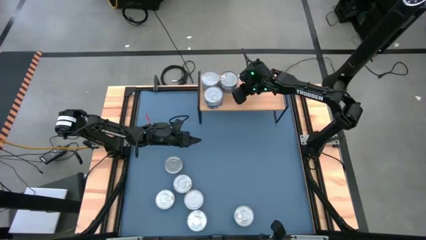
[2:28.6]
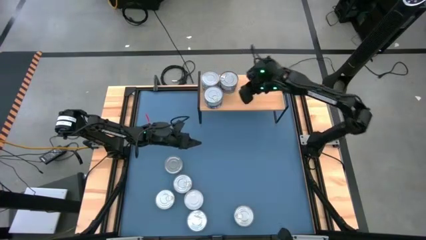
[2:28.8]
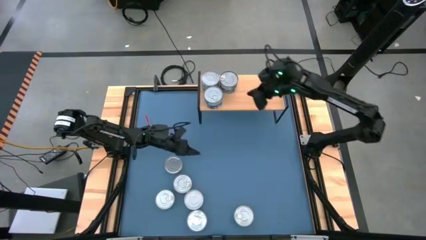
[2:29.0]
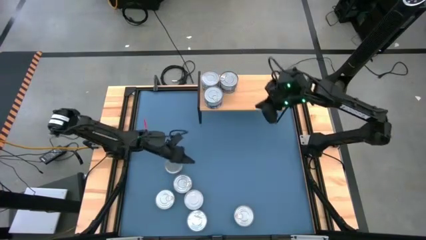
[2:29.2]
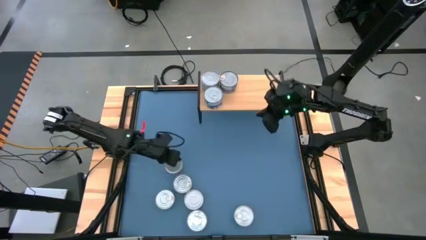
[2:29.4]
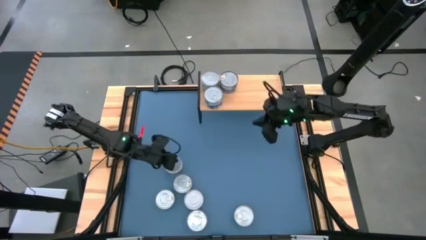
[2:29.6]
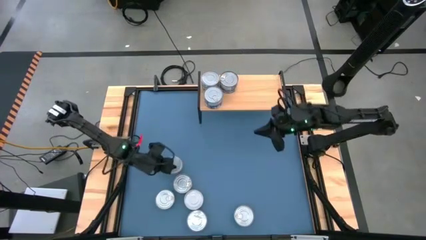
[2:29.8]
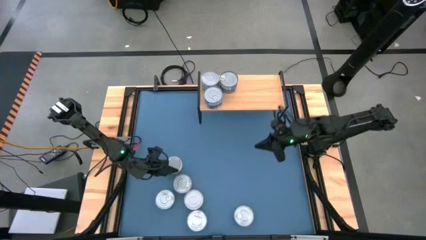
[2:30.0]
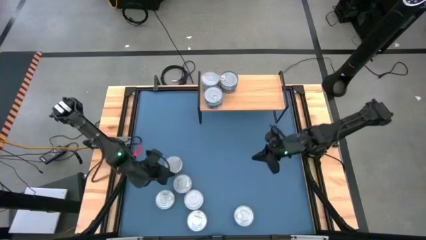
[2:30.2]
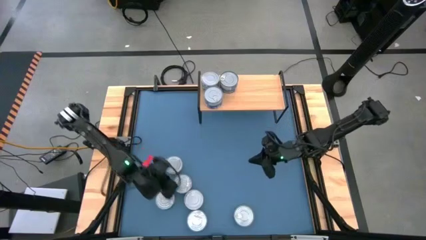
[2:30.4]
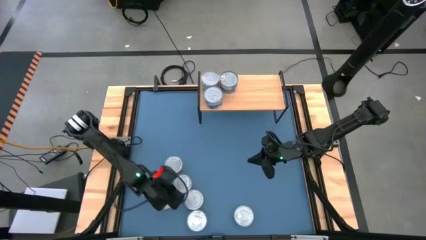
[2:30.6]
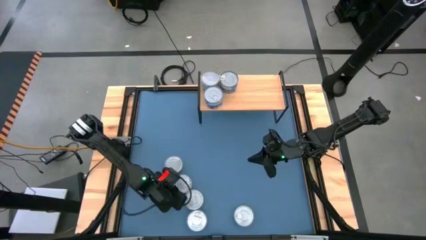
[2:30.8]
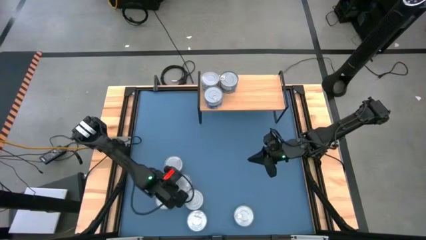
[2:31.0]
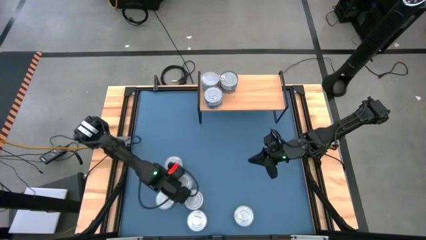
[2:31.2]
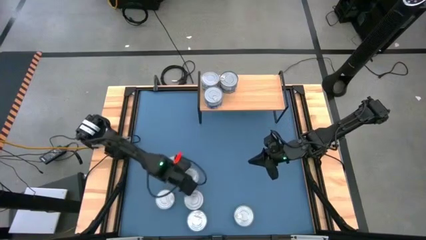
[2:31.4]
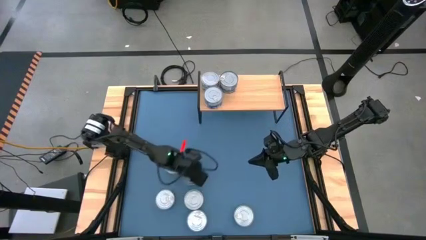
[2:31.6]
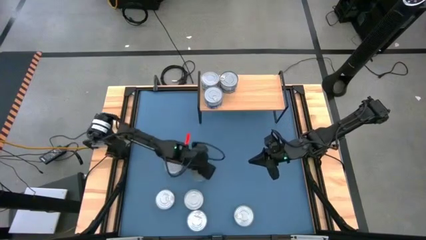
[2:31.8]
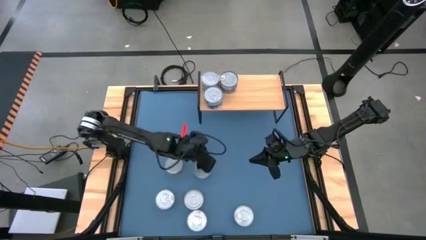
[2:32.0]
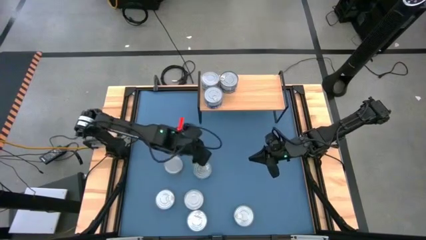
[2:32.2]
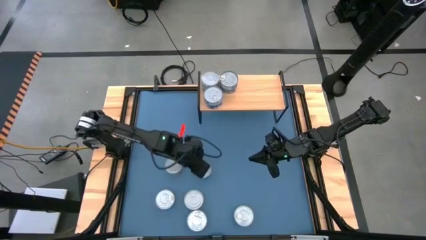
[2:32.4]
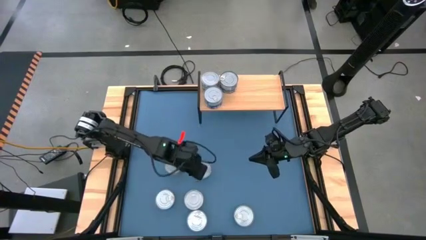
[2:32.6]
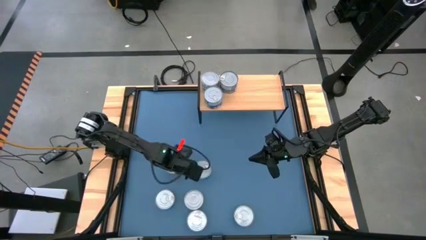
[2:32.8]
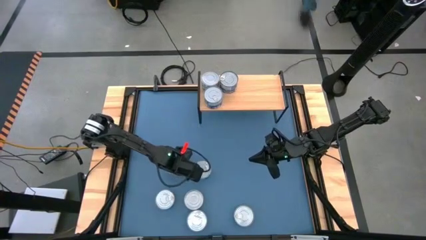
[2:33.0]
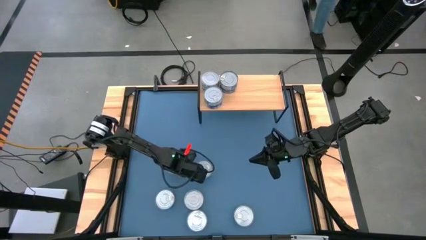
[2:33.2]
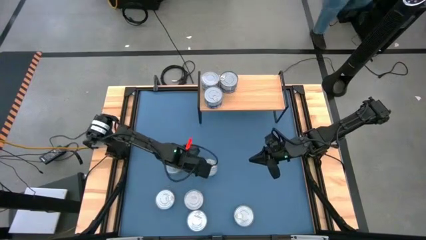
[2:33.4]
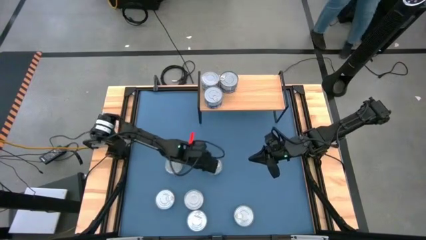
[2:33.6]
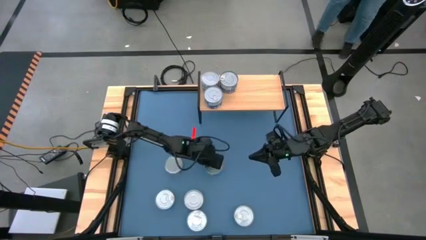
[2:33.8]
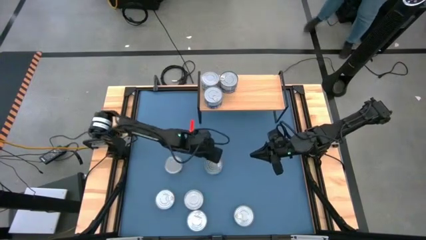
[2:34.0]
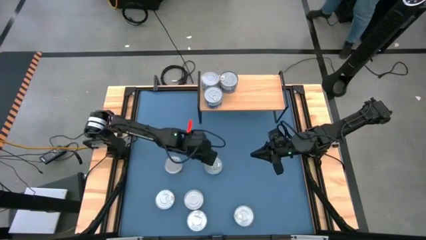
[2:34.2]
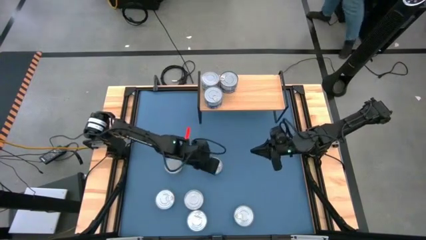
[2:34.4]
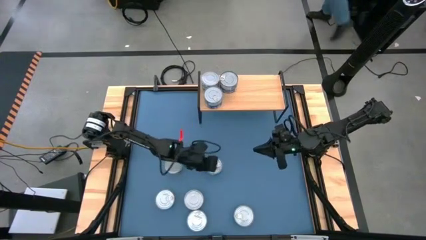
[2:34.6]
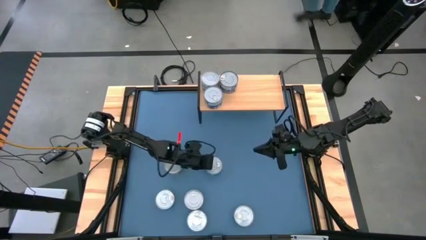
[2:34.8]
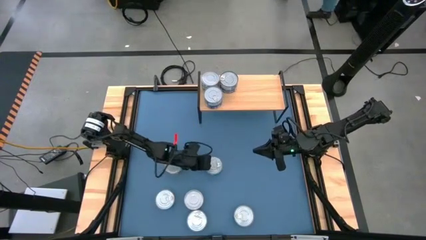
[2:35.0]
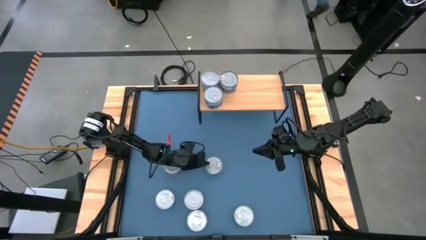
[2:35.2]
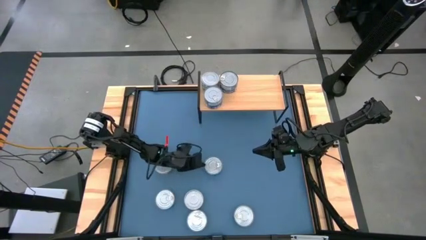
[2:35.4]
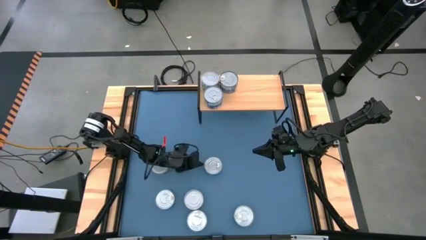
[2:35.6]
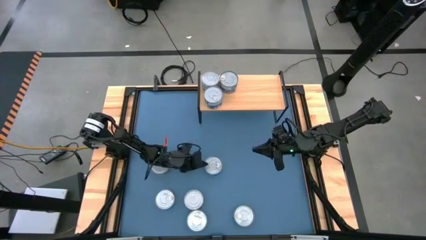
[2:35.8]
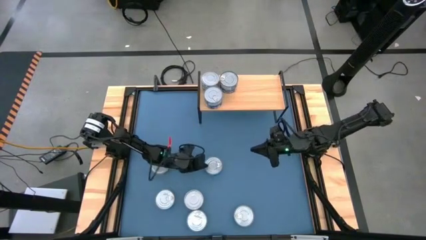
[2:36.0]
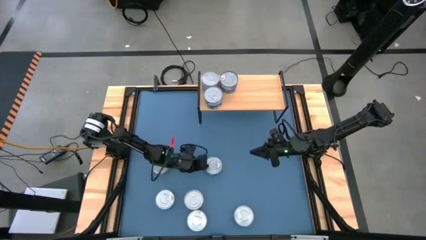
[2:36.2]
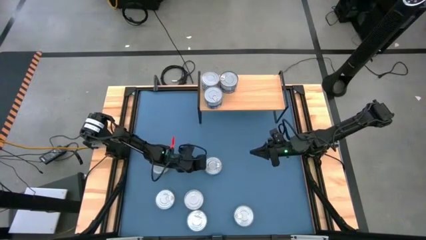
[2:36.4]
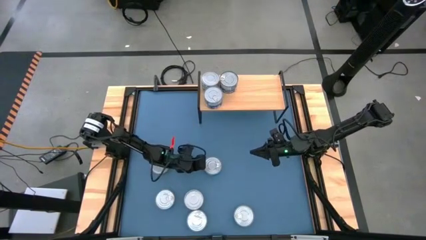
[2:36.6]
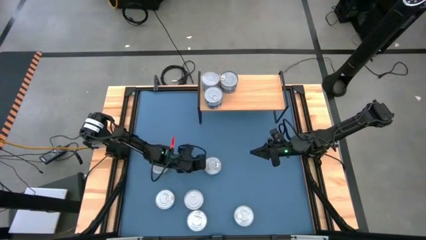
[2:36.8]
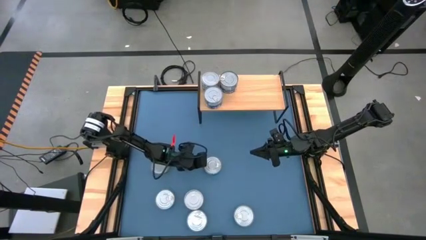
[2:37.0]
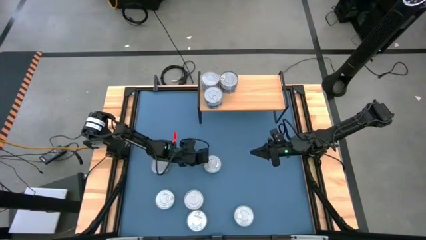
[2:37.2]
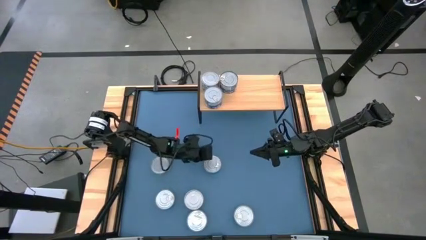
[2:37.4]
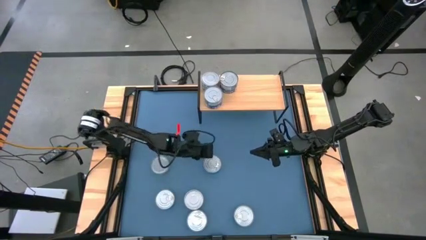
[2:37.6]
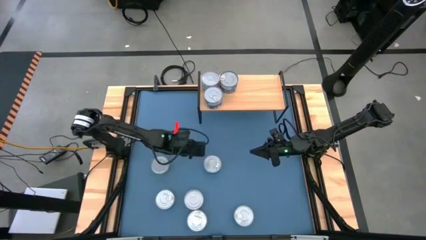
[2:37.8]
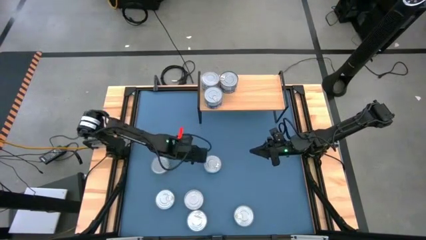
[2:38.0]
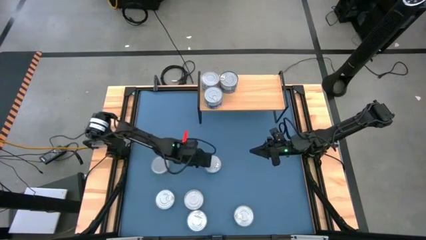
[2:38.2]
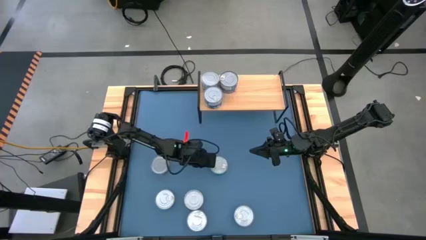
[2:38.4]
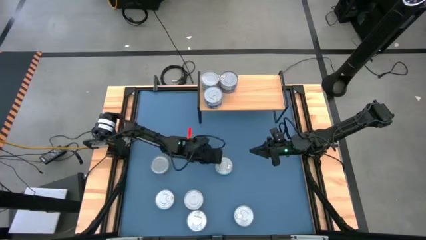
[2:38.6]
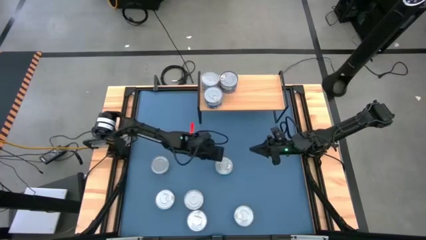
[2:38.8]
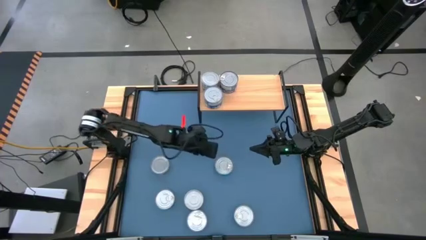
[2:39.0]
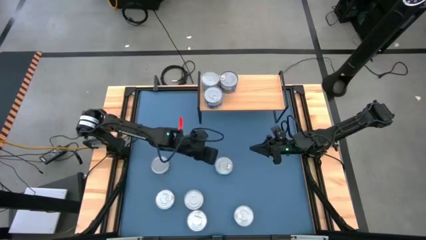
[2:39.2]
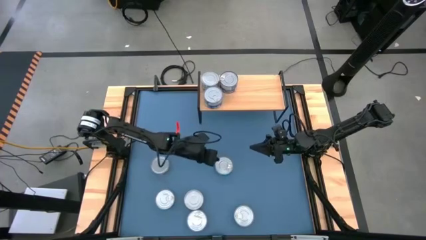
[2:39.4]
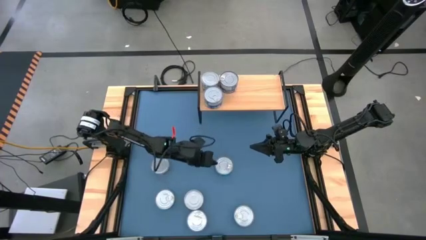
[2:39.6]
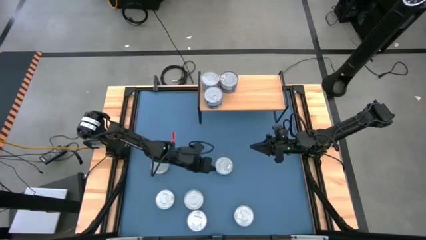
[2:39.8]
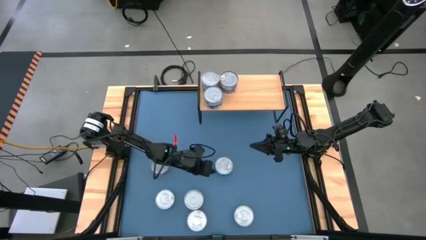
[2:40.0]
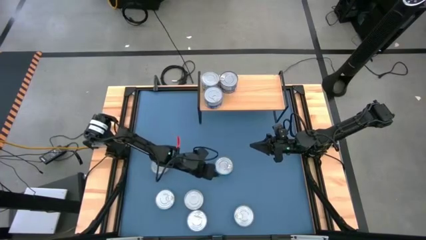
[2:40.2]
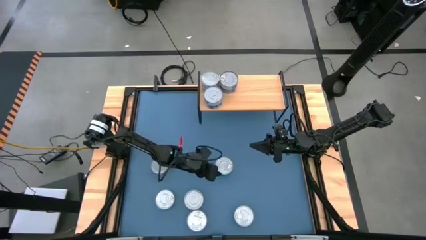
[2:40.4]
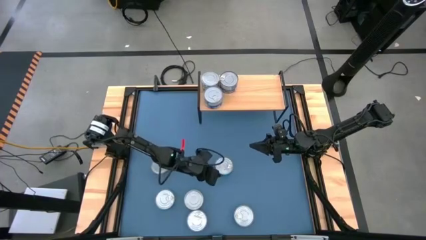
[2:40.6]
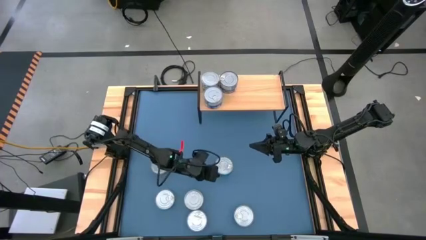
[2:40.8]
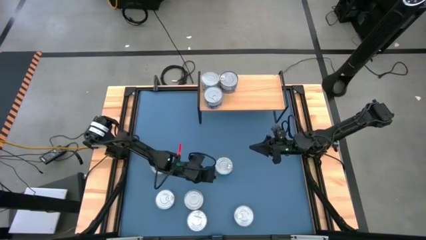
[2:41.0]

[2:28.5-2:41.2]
Task: Stack canned seafood by type on shelf
Put the yellow blue tuna can on the shelf

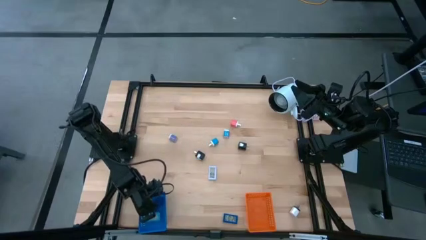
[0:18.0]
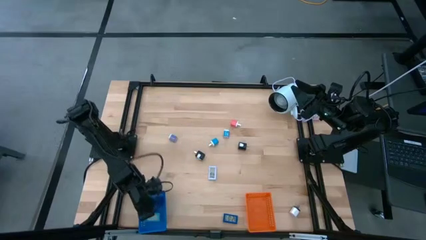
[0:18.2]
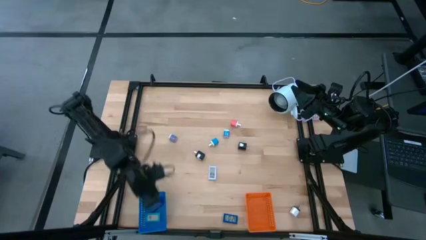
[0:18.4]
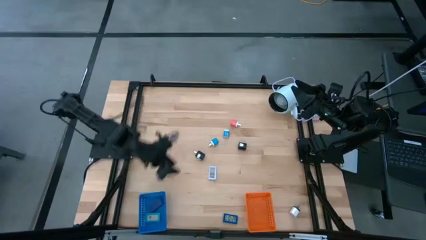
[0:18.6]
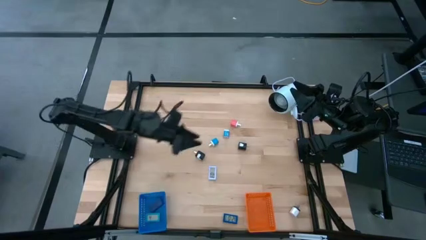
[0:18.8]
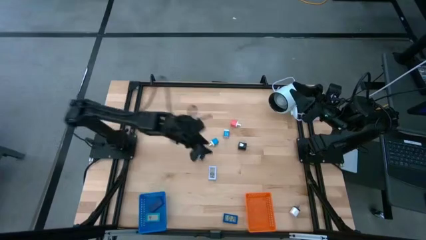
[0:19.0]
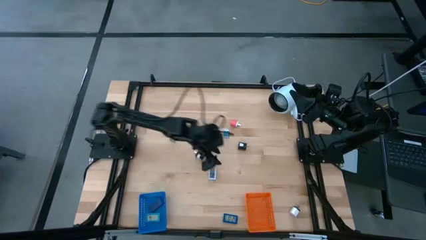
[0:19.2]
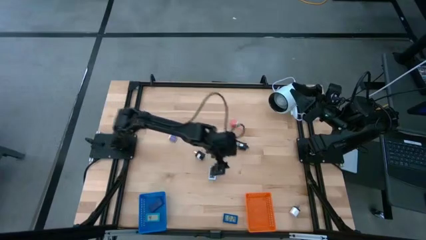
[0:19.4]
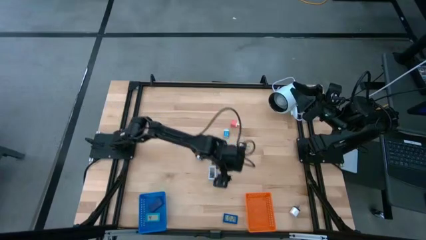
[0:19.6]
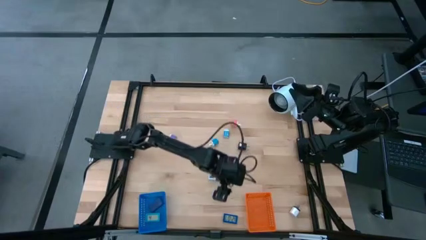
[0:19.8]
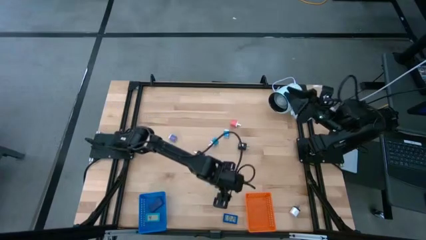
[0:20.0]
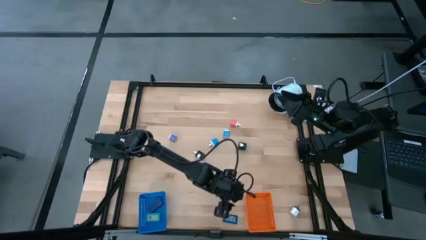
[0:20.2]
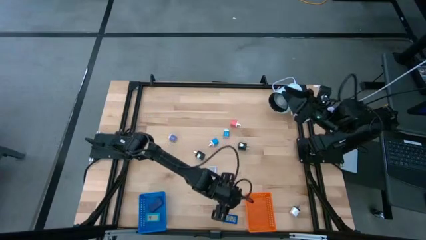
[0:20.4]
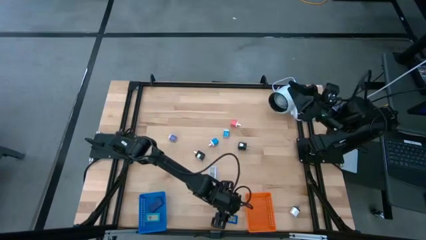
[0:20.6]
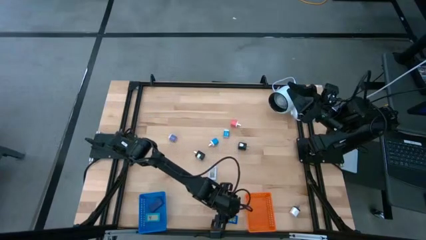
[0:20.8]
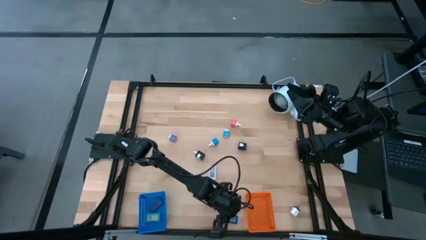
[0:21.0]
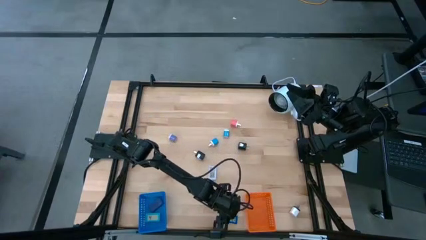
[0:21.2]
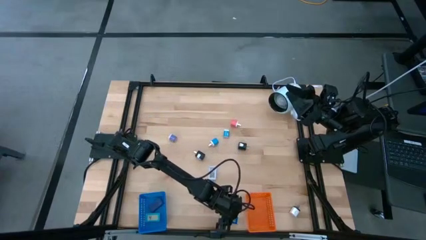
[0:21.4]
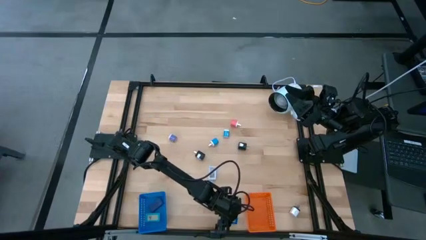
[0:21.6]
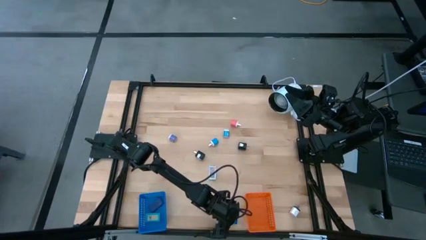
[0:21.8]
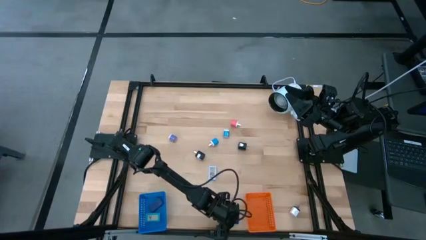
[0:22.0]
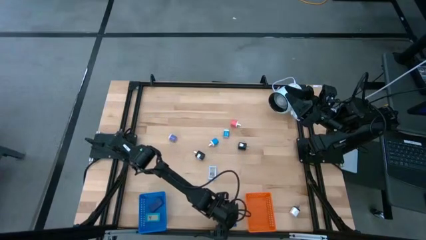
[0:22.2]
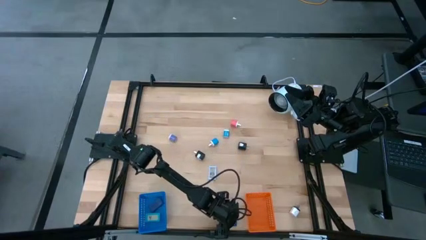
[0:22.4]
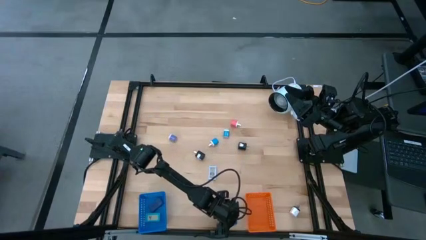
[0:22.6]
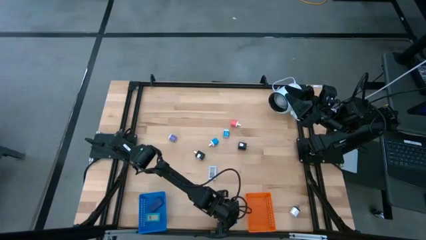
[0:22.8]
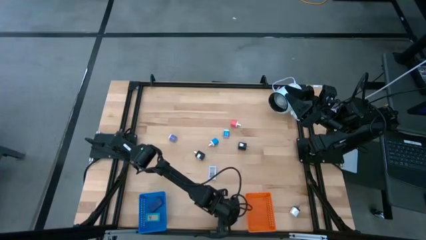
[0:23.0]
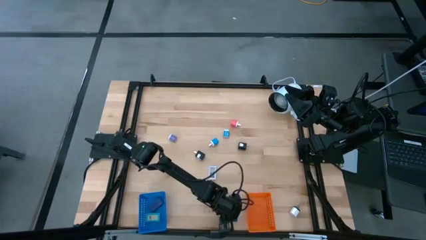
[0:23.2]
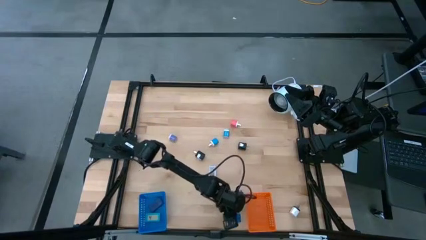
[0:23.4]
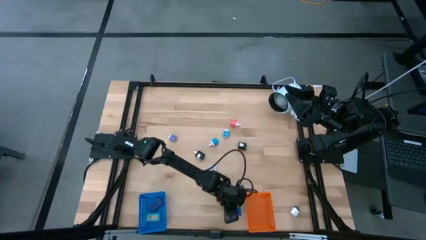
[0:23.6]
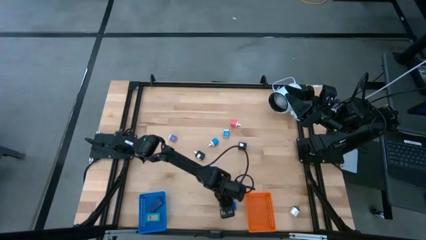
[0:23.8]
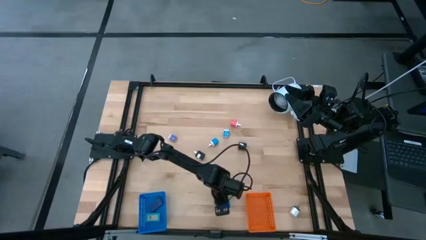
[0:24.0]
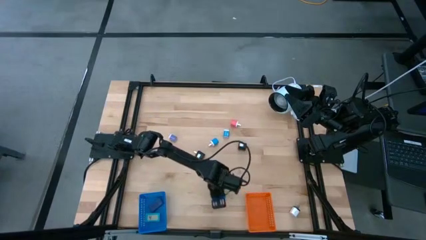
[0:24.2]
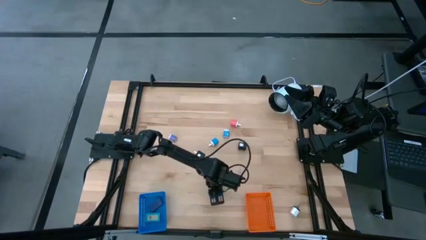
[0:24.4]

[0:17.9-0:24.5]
Task: Pick & Place Office items
Put the blue digital clock into the blue bin
